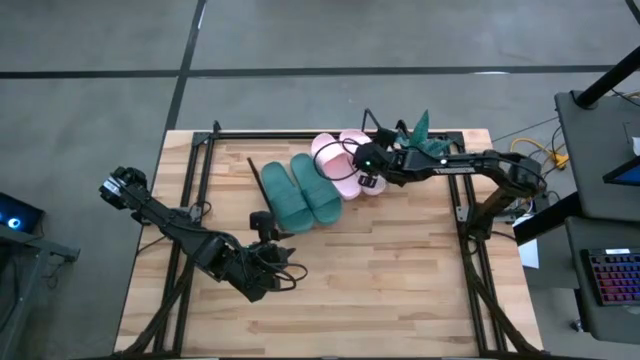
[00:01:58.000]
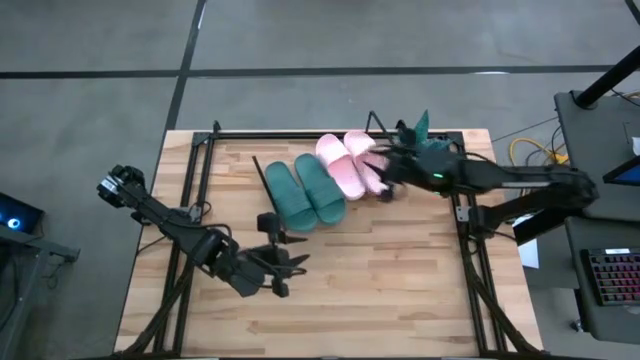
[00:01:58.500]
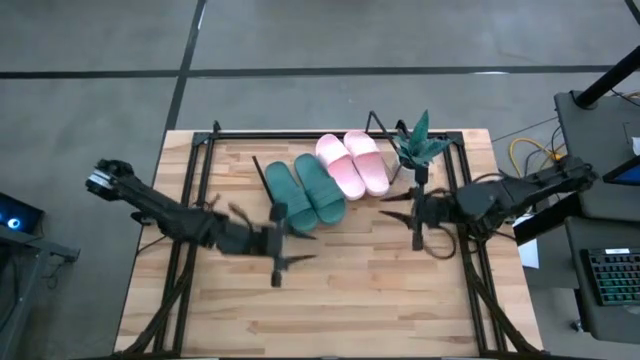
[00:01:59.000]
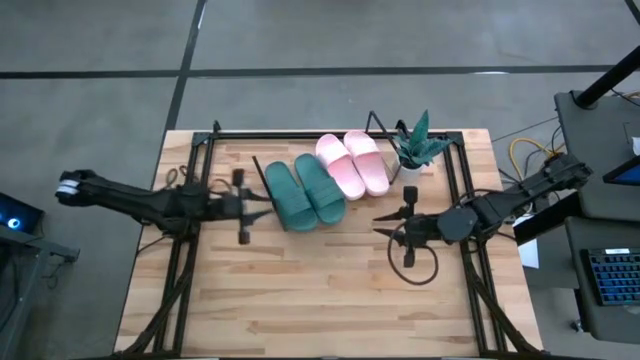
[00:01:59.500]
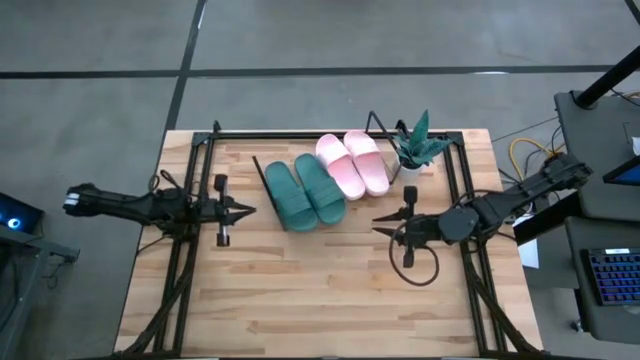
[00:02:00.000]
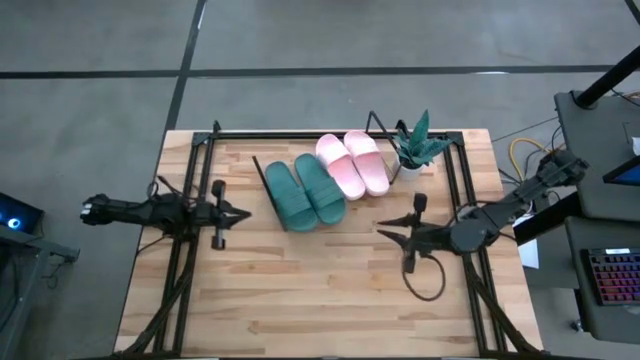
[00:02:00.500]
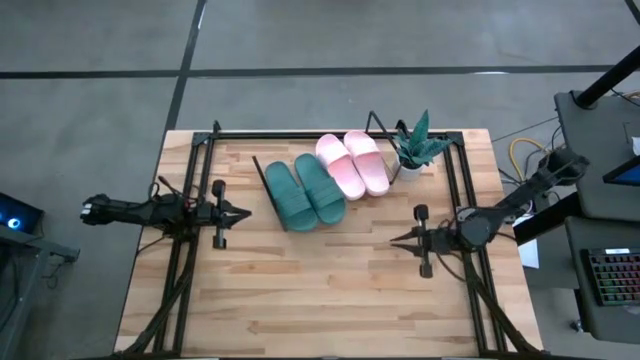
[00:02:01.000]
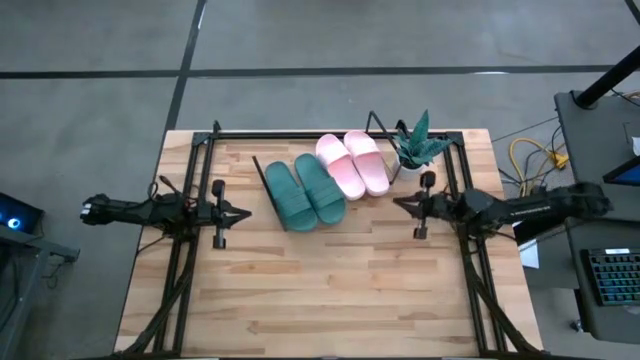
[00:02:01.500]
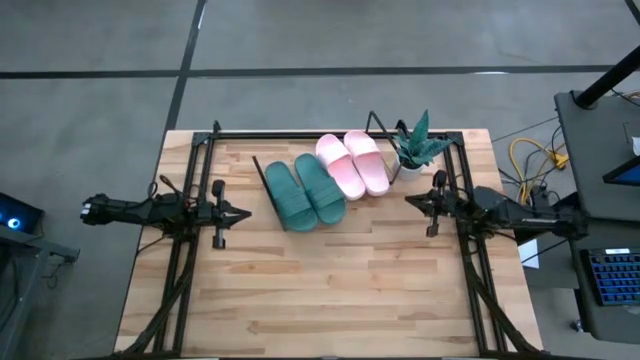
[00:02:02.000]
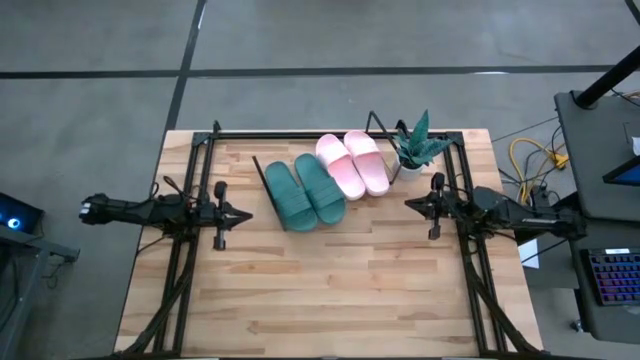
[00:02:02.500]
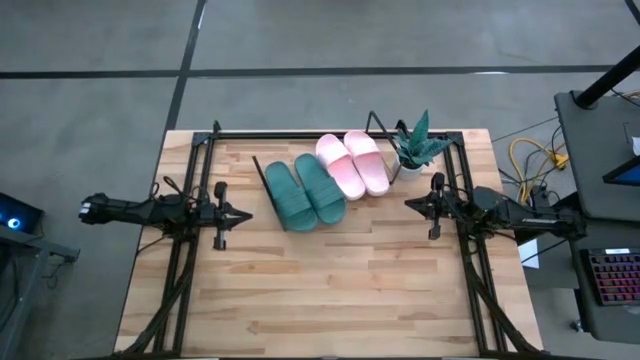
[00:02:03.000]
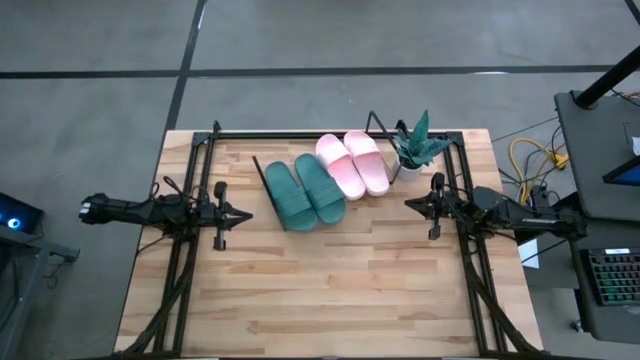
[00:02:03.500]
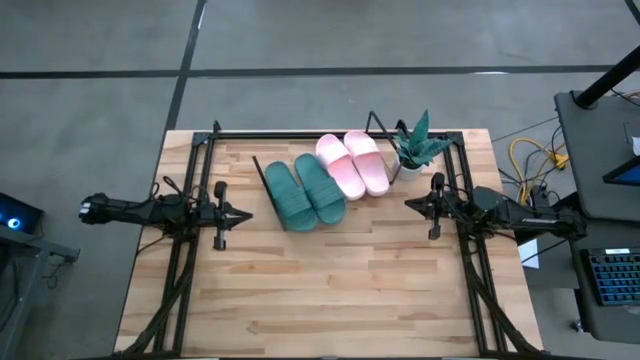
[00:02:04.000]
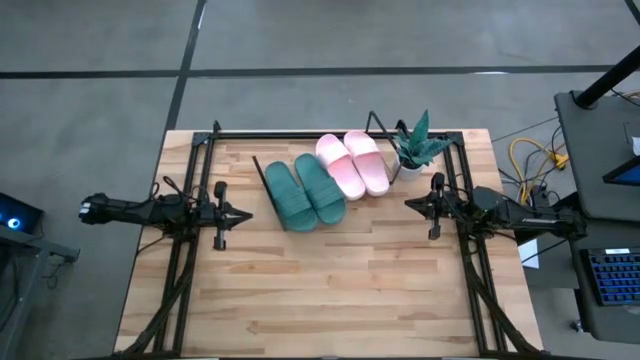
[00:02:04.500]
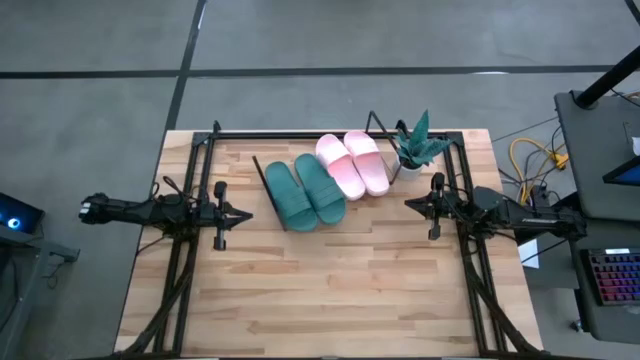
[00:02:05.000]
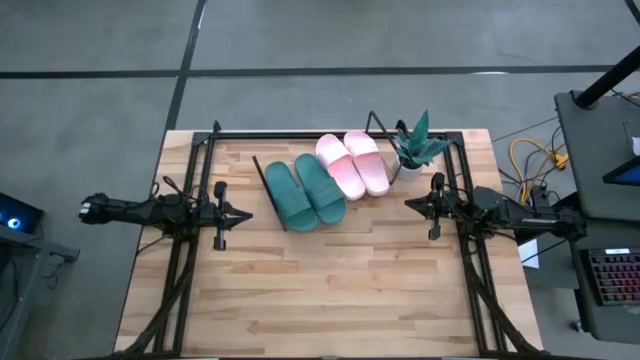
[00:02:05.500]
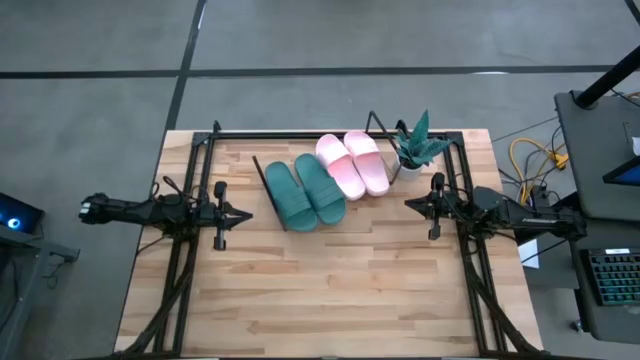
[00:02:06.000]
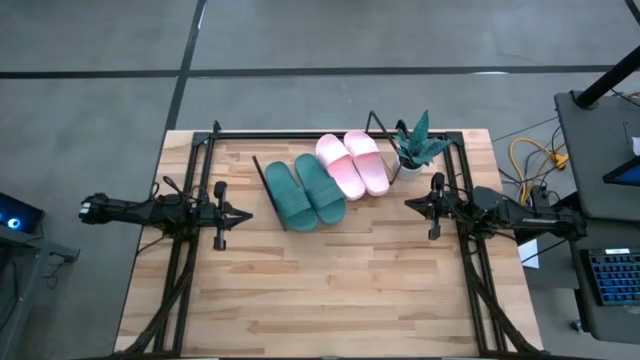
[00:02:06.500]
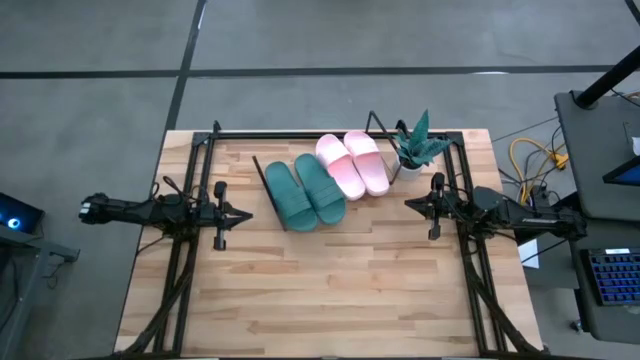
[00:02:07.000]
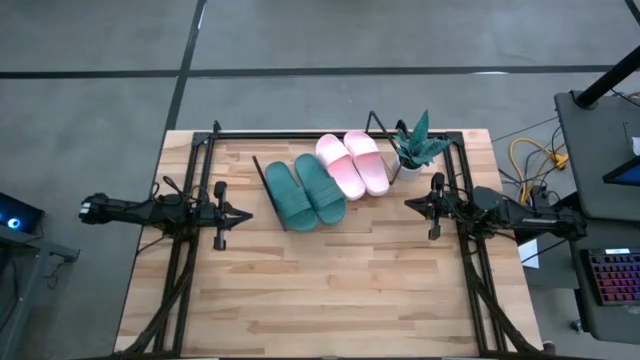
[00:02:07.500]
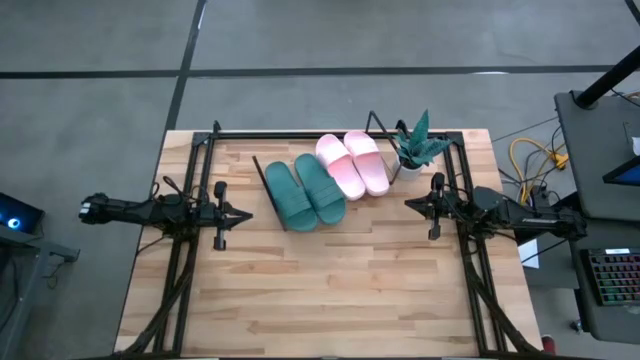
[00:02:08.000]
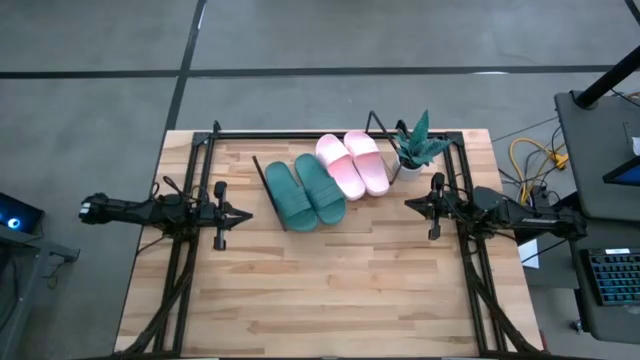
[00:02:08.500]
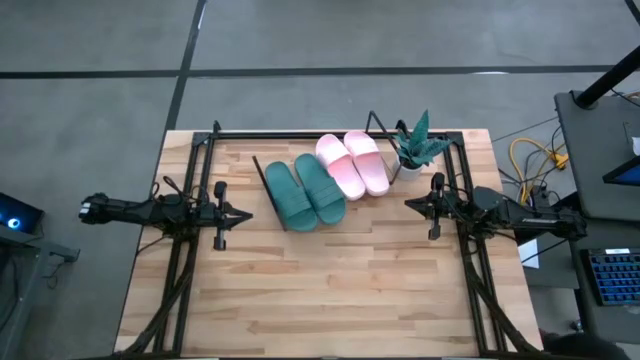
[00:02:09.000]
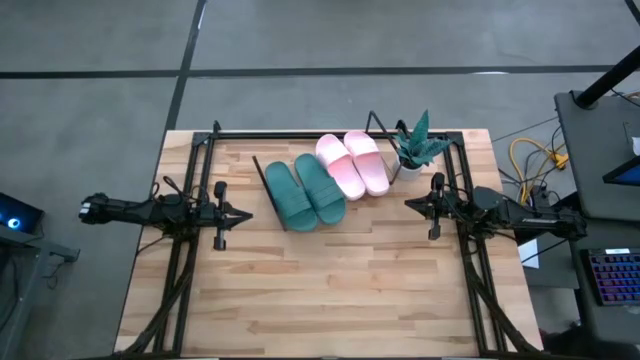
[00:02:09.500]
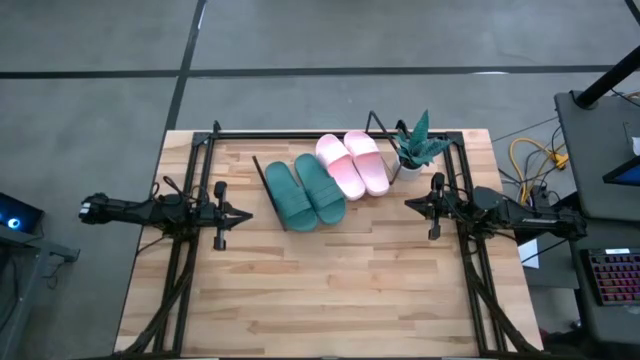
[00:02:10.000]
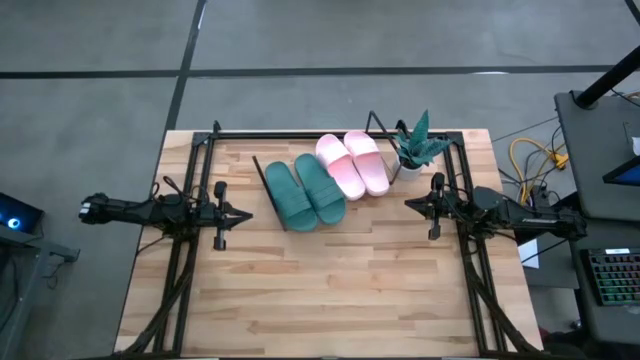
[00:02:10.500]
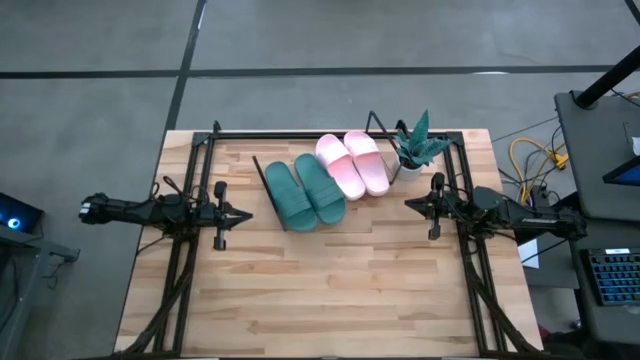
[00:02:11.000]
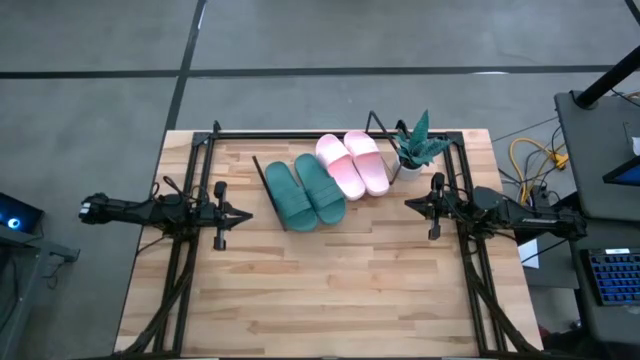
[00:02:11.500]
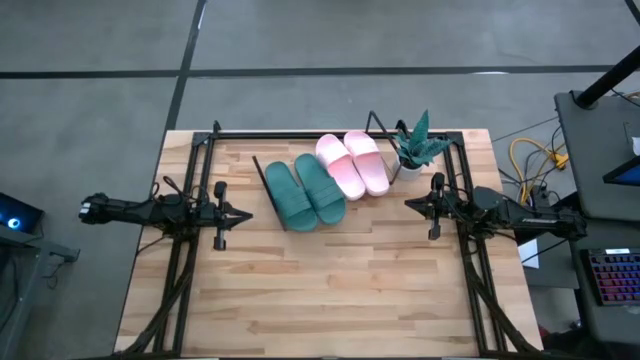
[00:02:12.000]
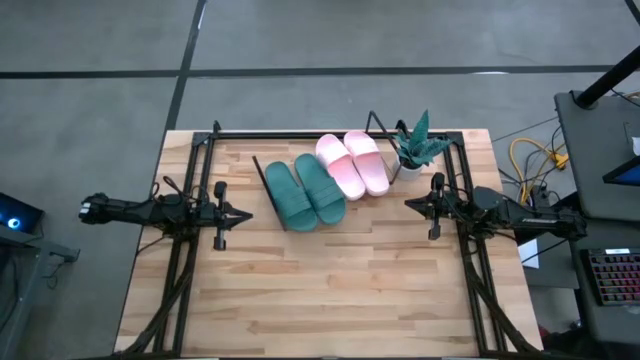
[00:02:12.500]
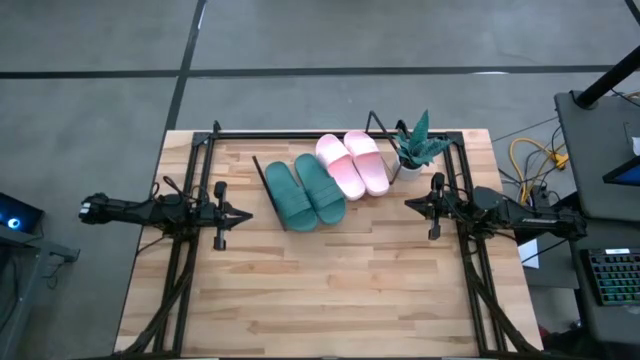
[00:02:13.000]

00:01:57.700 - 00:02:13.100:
Task: Pick and place slides into the shelf
Return to Home Position
